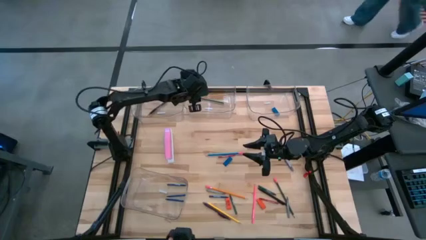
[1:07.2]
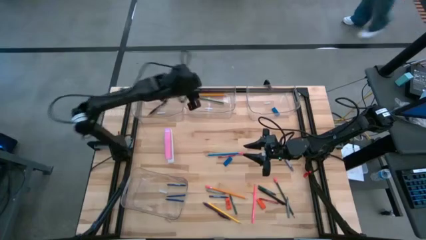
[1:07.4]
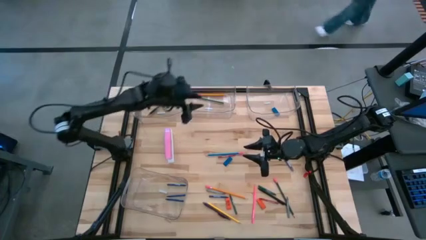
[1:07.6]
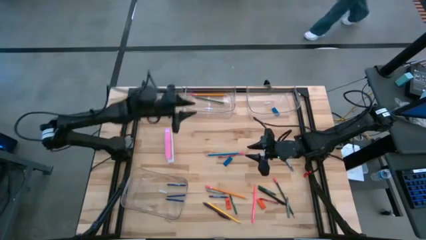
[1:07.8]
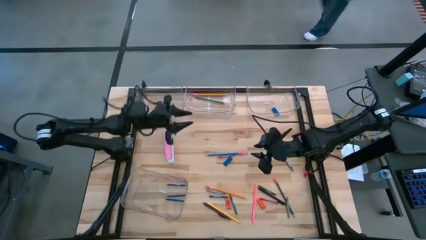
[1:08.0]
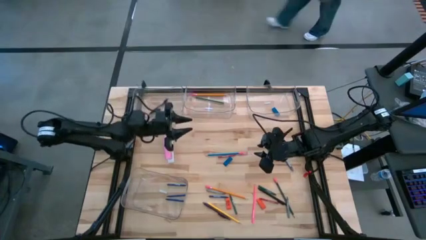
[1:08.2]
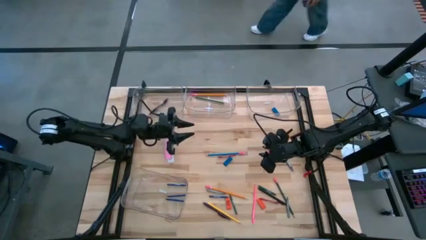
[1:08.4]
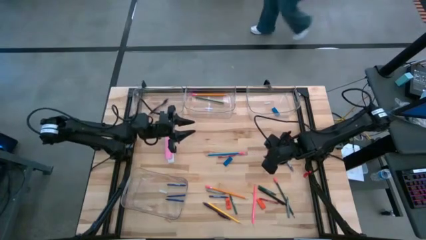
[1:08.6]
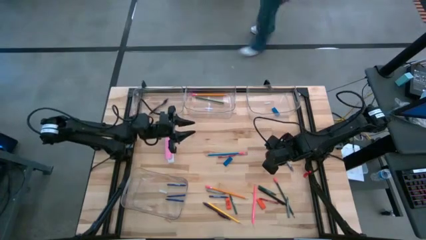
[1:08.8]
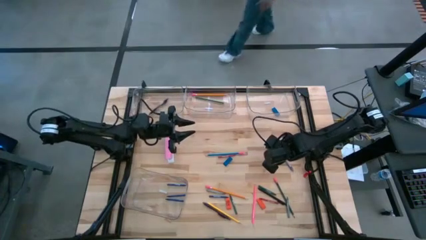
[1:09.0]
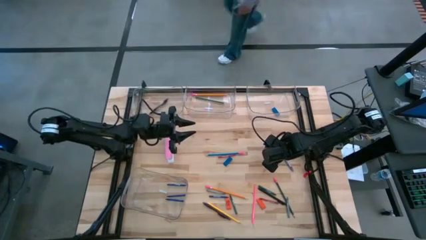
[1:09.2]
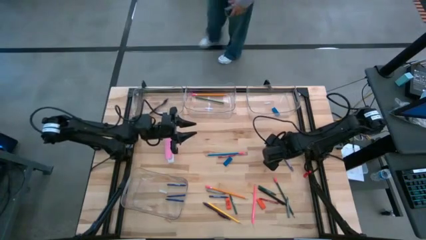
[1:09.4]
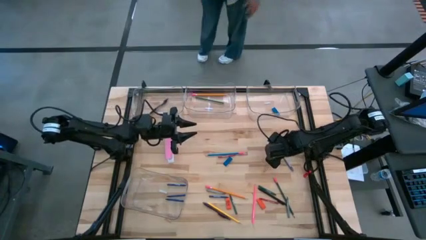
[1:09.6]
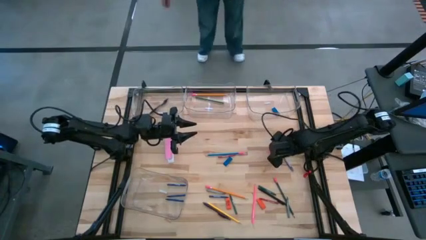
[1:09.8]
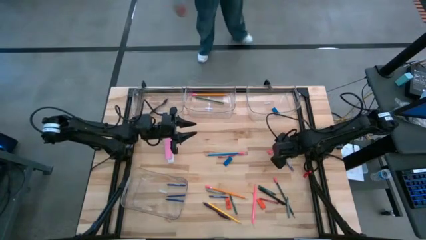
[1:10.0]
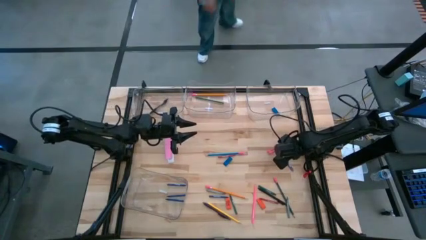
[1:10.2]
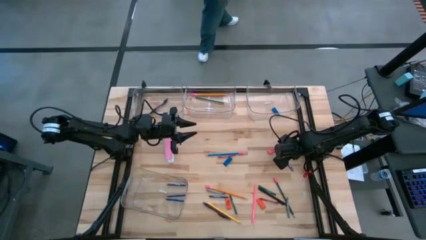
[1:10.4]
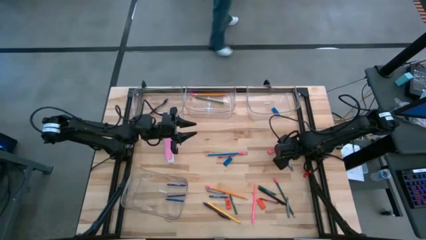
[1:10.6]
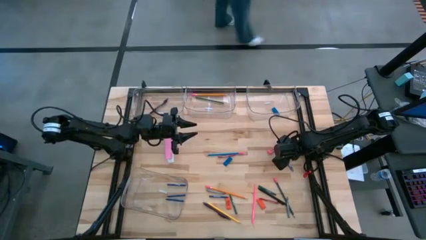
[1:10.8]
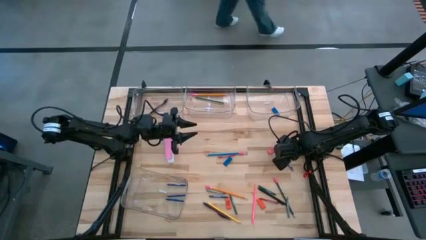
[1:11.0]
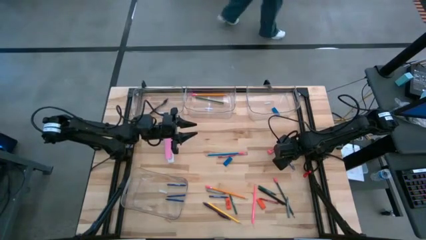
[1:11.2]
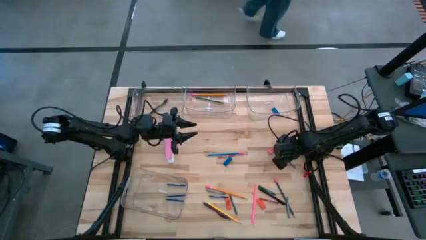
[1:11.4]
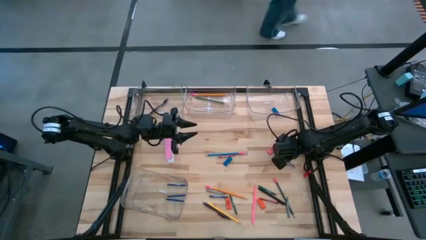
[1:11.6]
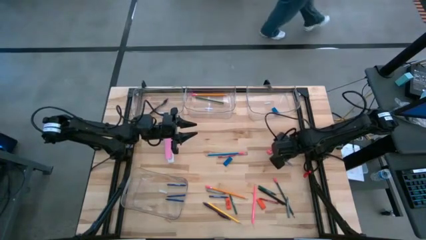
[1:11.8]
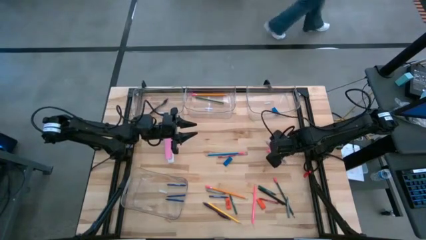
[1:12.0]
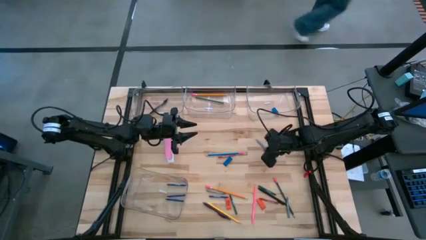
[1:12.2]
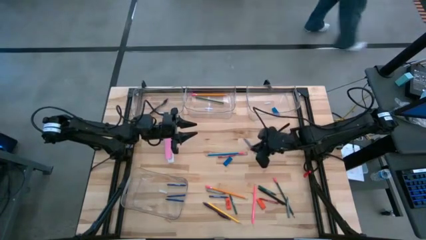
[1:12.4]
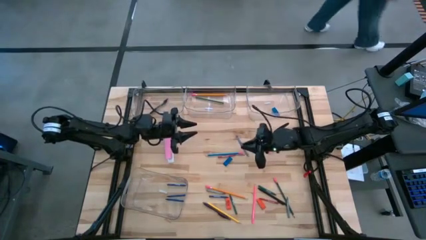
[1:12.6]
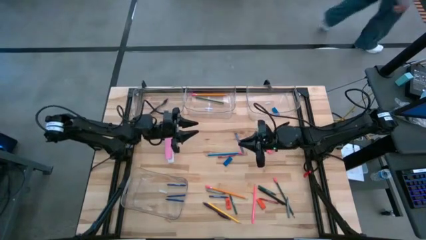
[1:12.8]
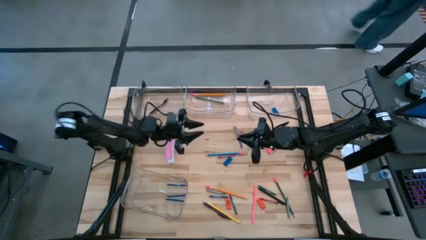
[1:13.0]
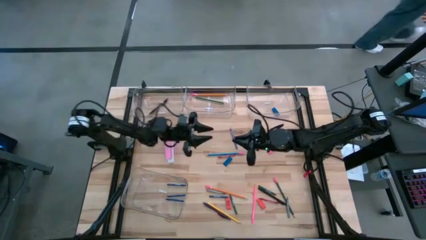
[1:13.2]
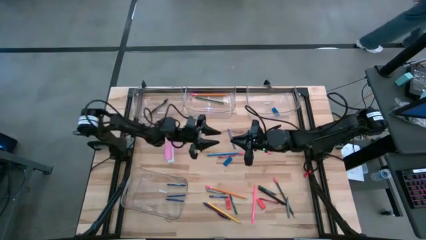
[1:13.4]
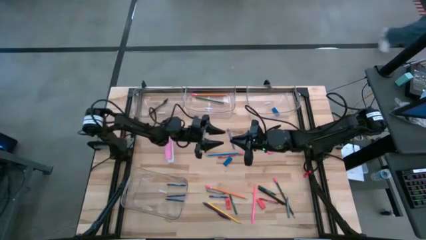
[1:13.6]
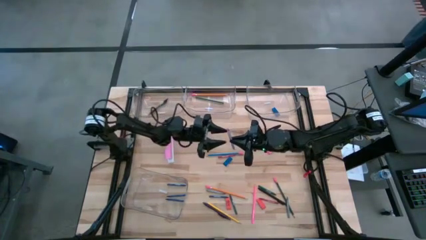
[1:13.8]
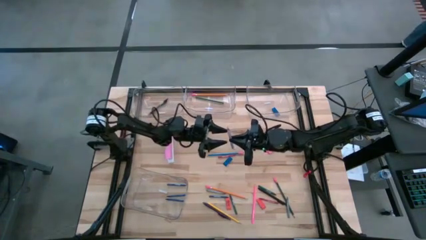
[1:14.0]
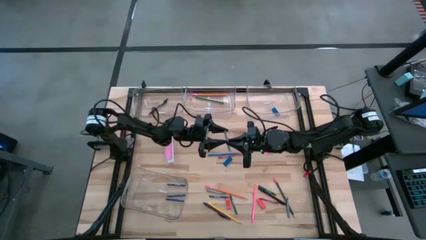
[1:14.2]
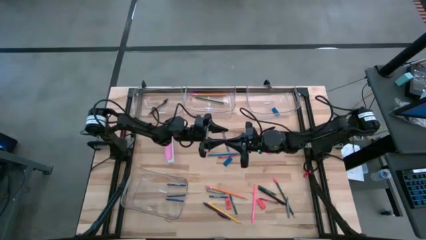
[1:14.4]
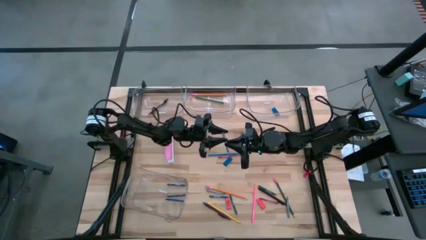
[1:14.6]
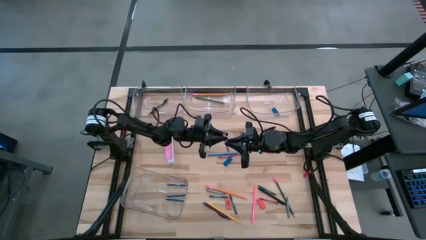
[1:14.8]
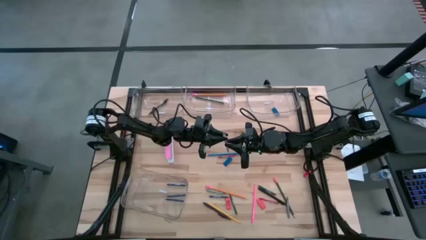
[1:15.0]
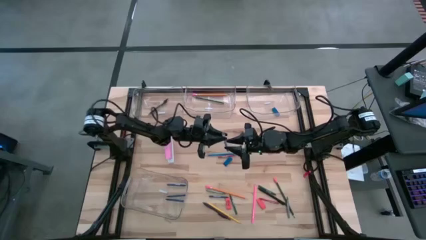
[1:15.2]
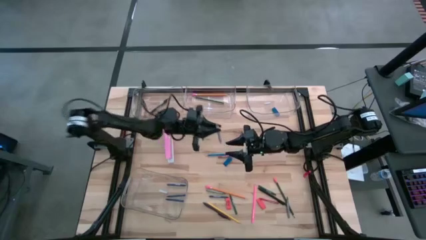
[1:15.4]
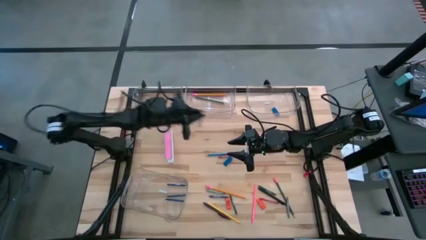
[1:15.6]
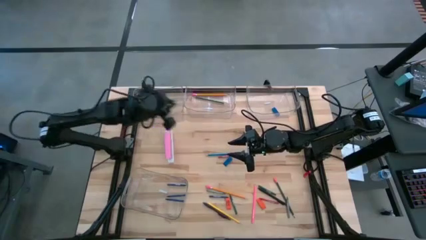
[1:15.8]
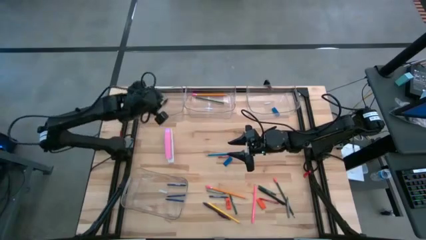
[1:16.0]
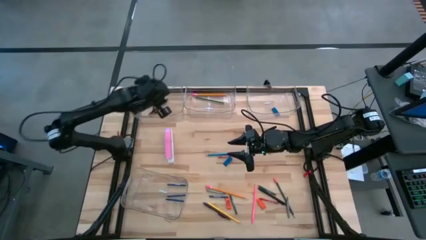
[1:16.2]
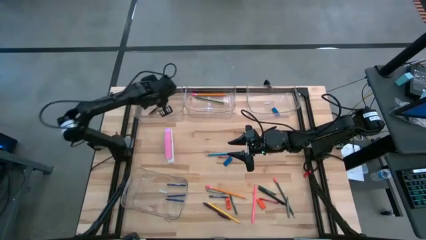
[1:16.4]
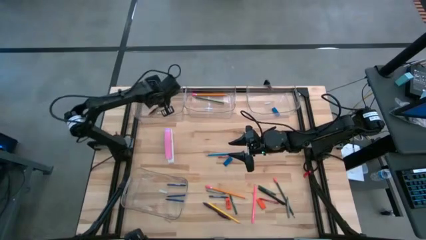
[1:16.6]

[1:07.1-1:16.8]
Task: Sort crayons/erasers/pens/pencils in bins
Put the light purple pen into the top left transparent bin

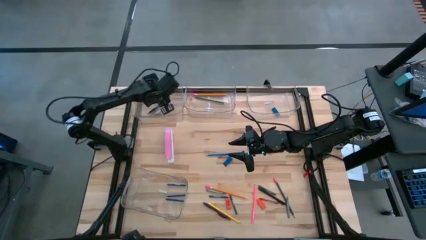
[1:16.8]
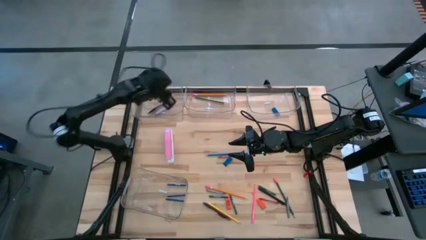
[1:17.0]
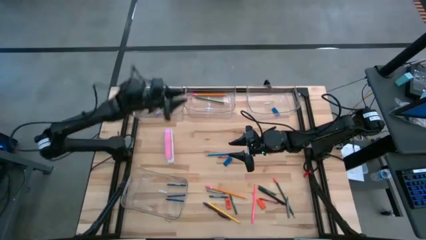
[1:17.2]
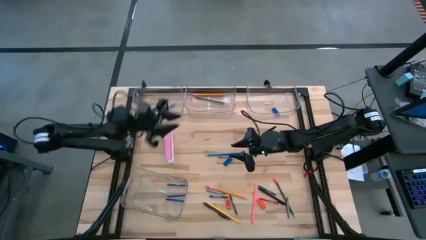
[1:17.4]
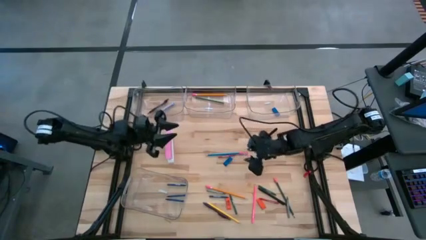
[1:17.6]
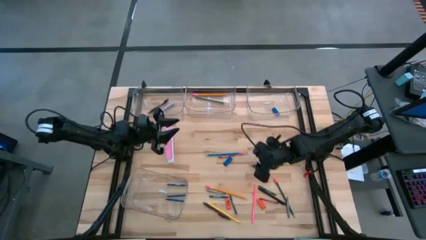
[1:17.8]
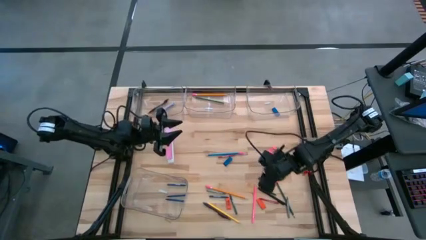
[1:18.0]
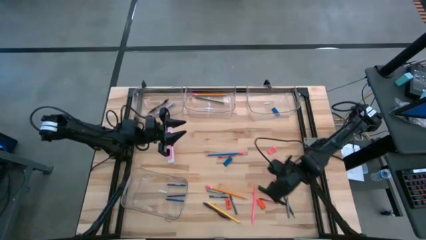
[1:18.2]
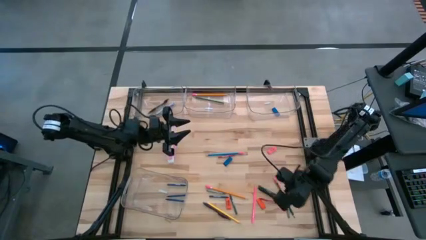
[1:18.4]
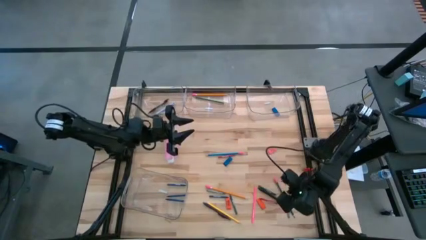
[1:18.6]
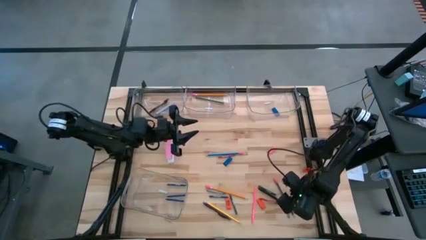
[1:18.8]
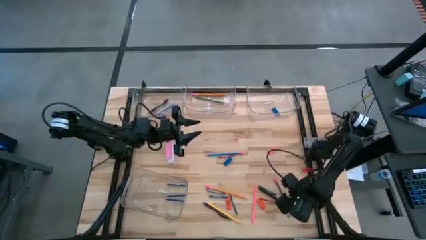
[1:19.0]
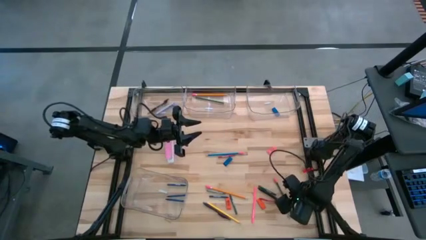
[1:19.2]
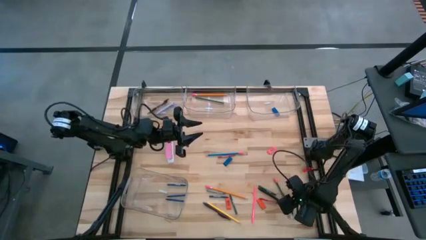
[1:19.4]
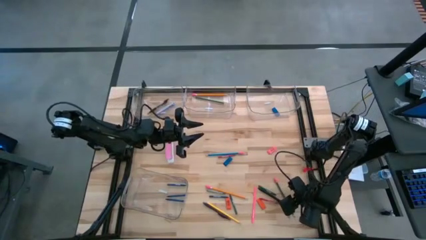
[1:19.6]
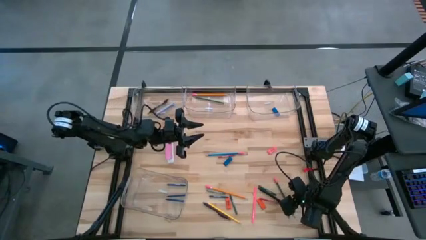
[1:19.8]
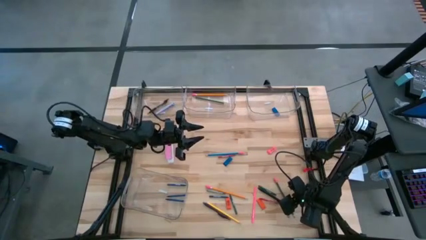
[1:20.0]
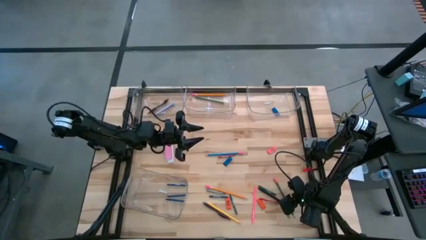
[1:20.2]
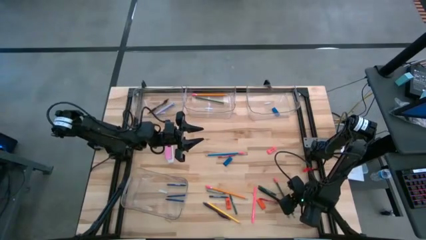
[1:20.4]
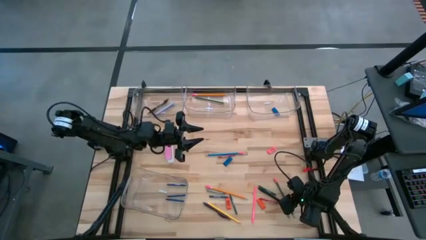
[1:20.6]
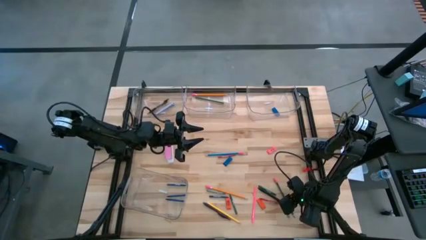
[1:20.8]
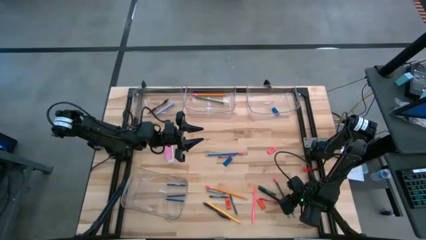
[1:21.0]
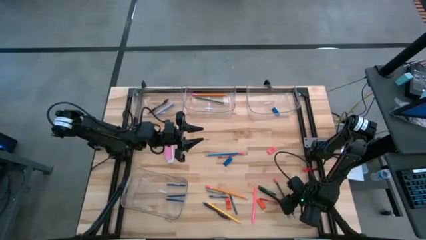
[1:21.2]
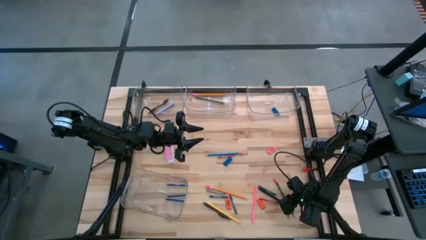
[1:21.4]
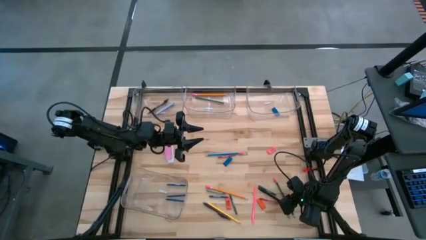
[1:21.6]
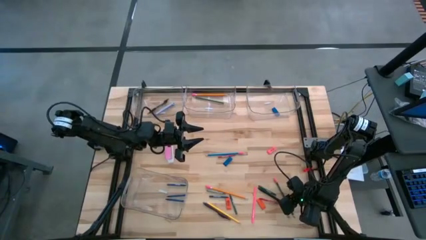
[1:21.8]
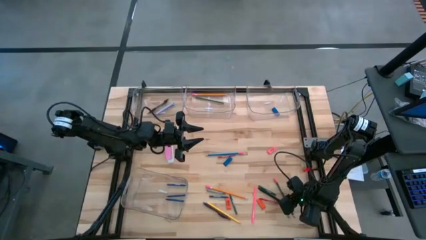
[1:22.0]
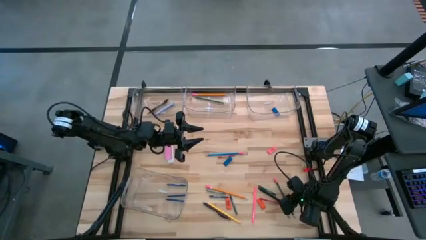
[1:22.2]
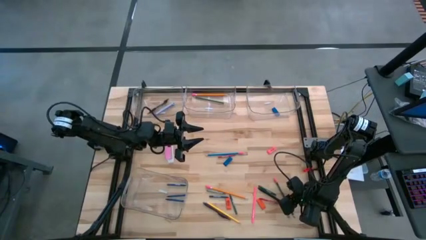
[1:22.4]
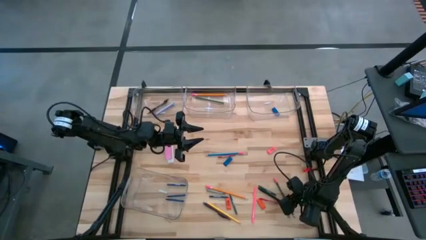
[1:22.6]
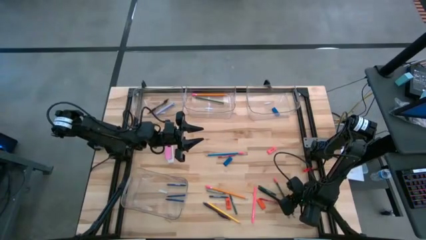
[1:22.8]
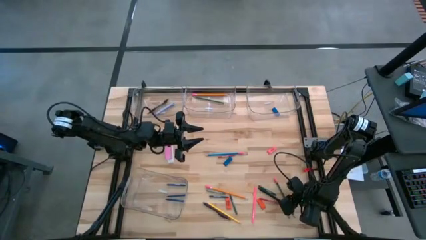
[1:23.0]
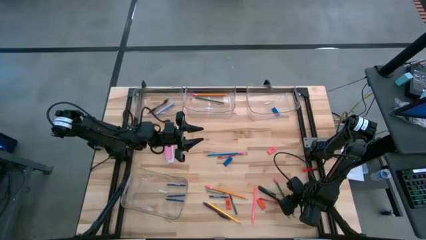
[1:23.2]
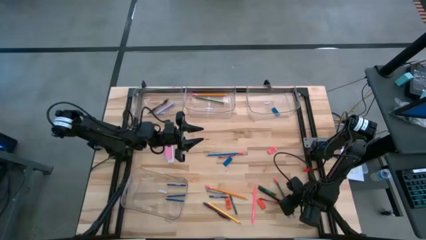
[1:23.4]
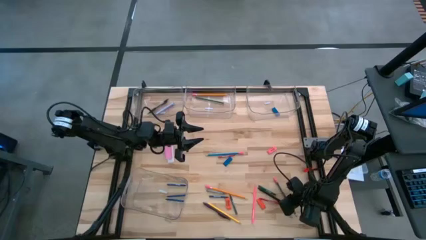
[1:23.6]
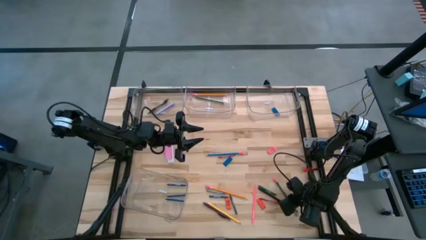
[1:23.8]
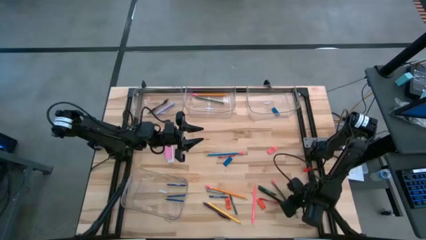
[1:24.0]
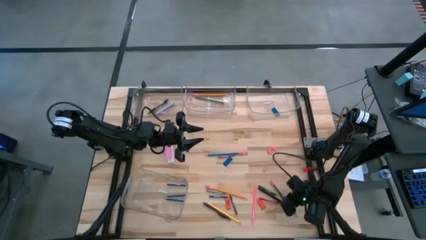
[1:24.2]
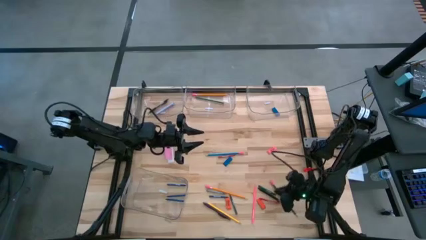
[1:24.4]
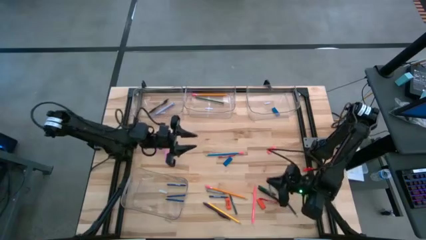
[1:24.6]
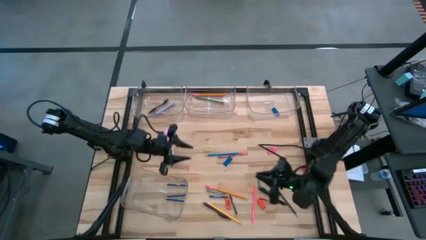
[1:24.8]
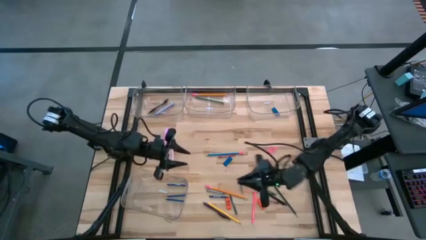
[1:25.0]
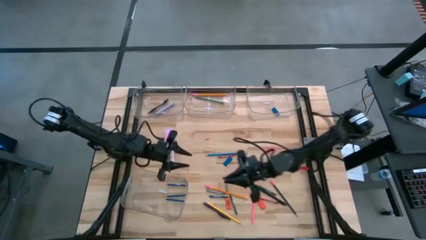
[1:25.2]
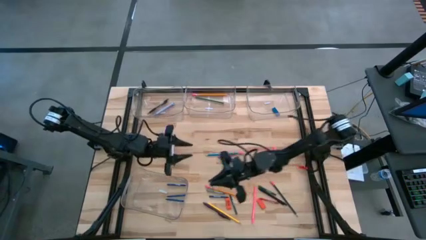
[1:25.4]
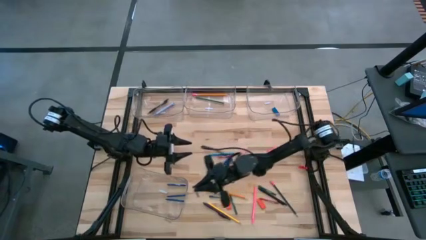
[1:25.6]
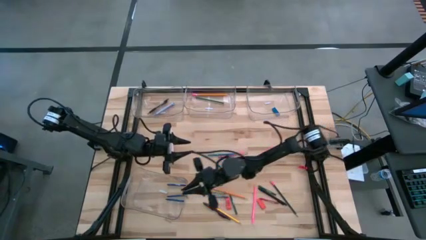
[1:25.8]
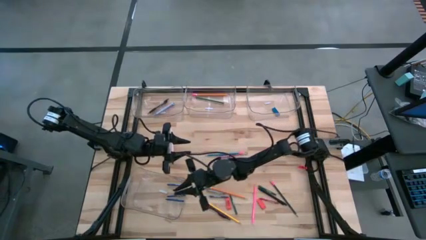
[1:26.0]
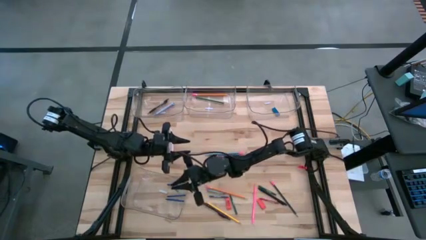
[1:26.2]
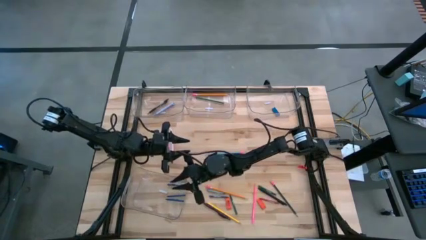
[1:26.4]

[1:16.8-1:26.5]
Put the gray crayon into the bottom left transparent bin
